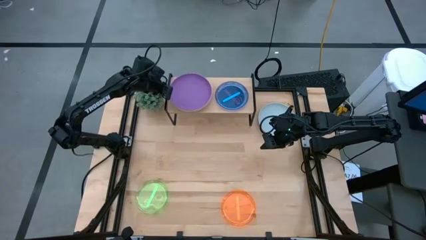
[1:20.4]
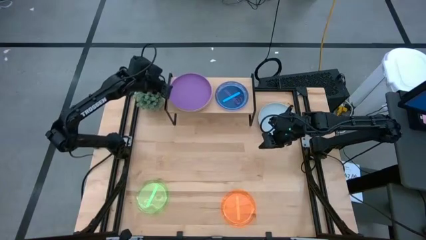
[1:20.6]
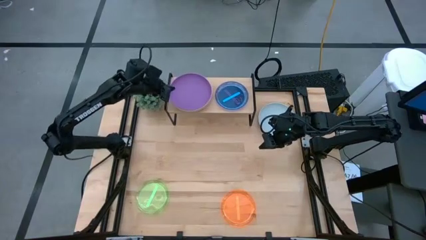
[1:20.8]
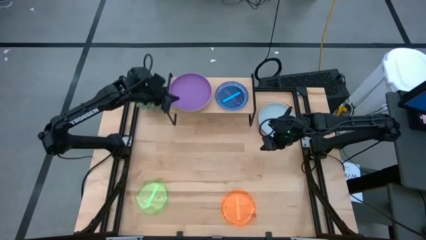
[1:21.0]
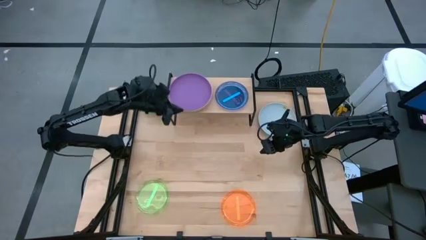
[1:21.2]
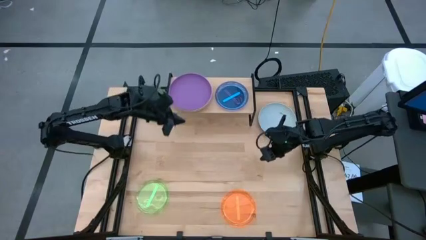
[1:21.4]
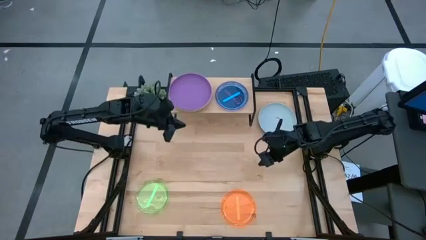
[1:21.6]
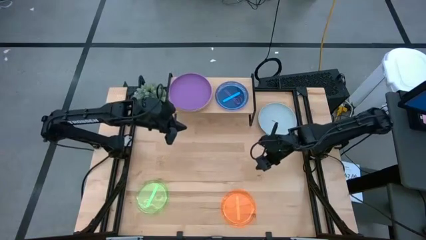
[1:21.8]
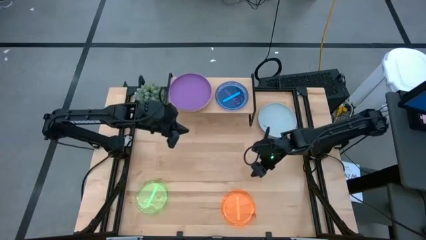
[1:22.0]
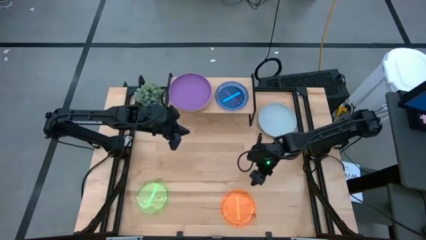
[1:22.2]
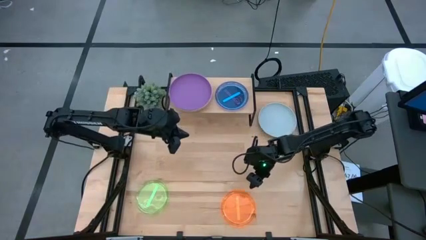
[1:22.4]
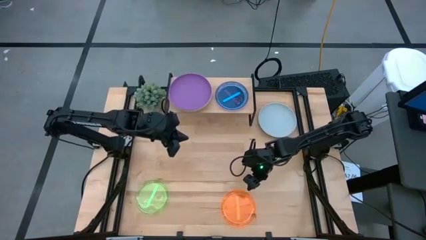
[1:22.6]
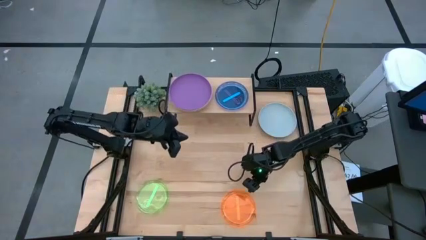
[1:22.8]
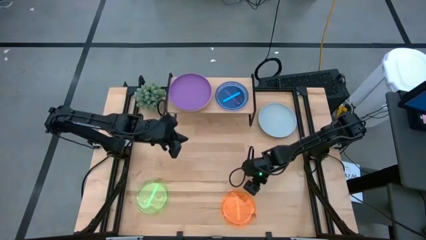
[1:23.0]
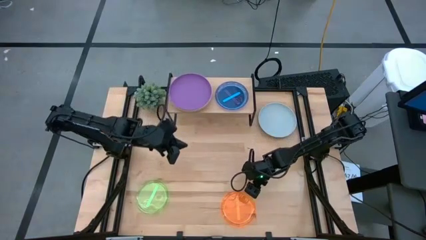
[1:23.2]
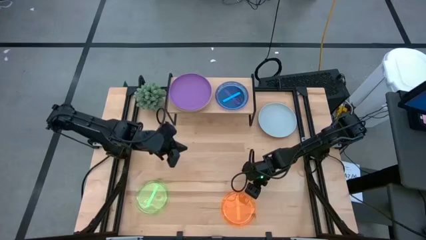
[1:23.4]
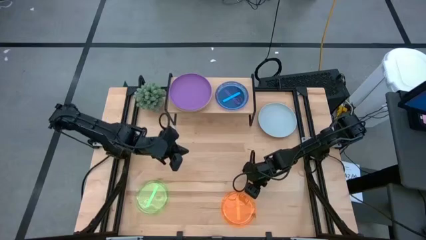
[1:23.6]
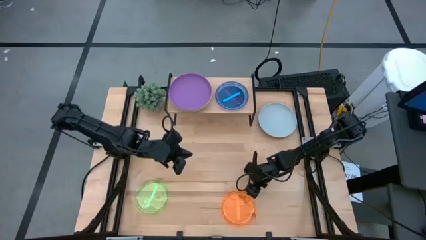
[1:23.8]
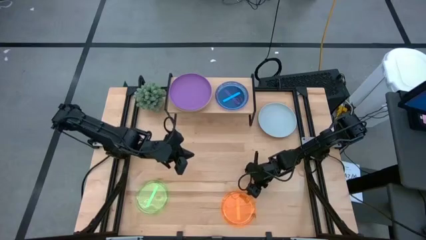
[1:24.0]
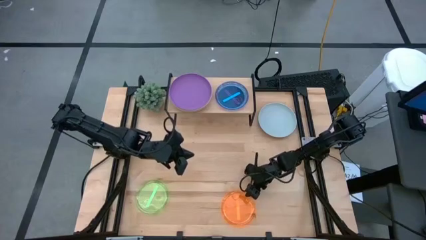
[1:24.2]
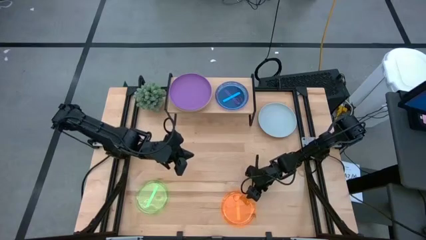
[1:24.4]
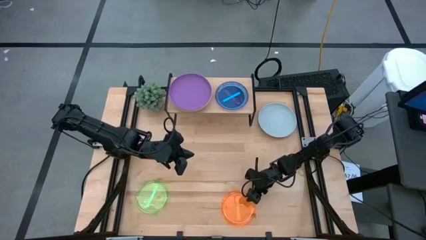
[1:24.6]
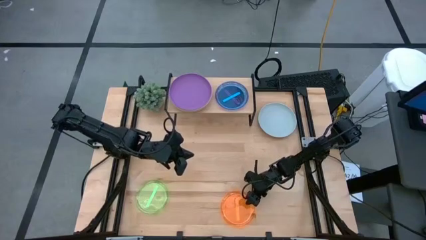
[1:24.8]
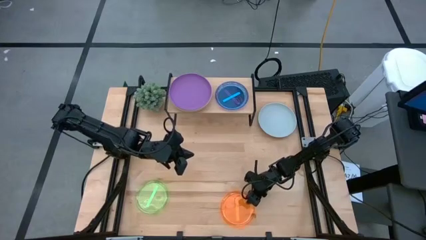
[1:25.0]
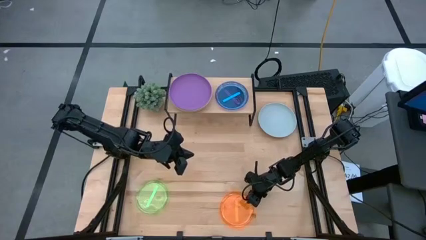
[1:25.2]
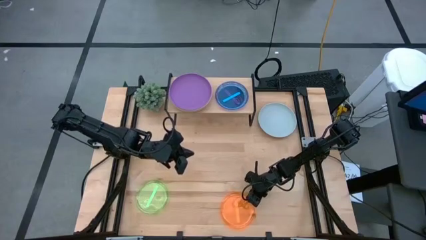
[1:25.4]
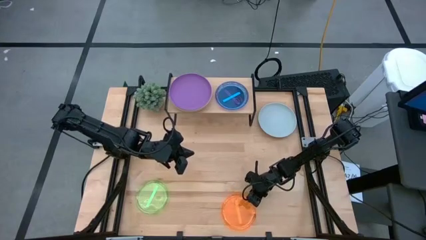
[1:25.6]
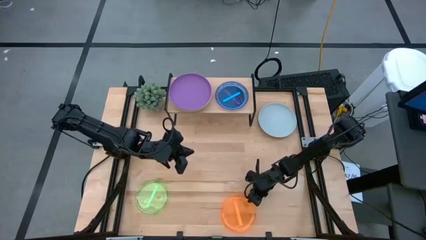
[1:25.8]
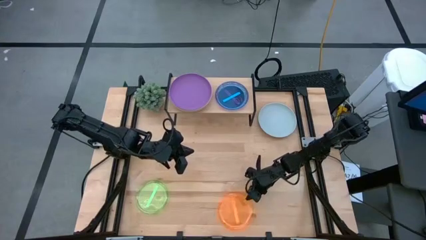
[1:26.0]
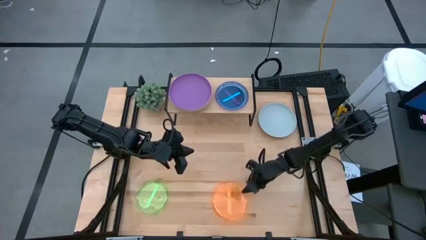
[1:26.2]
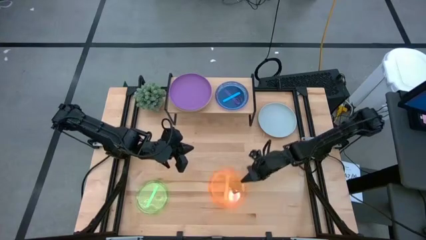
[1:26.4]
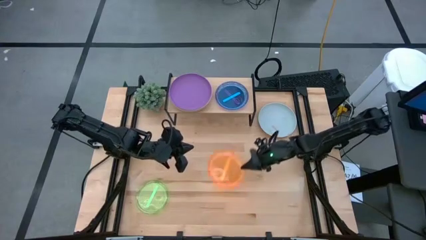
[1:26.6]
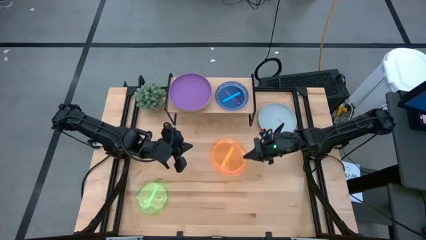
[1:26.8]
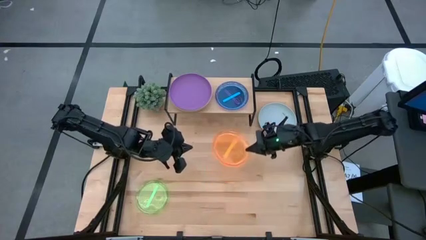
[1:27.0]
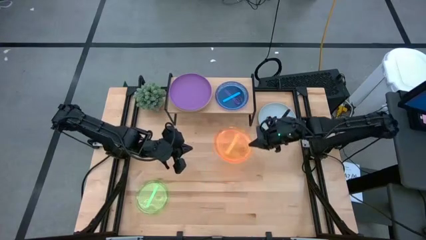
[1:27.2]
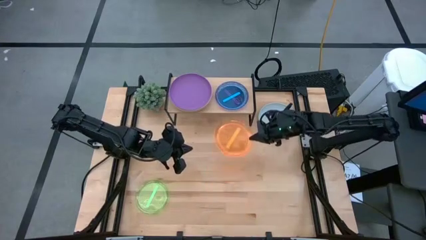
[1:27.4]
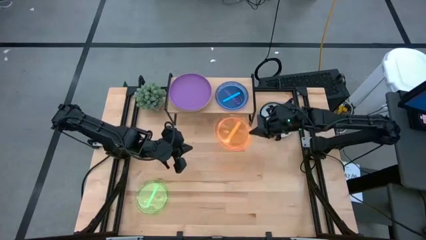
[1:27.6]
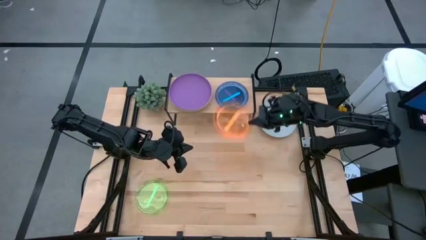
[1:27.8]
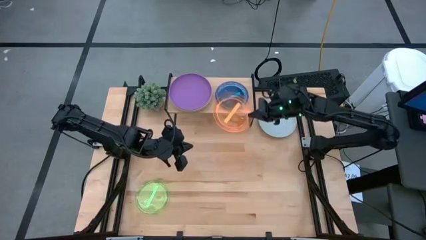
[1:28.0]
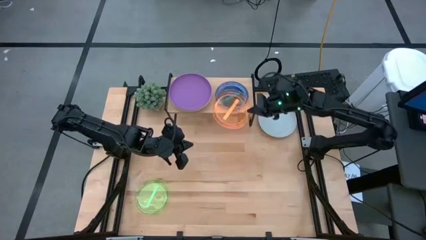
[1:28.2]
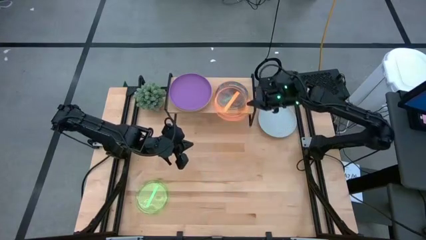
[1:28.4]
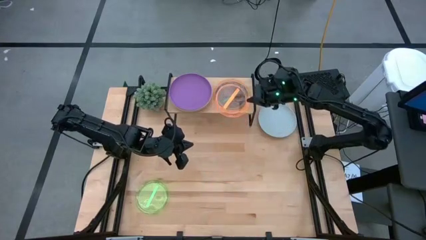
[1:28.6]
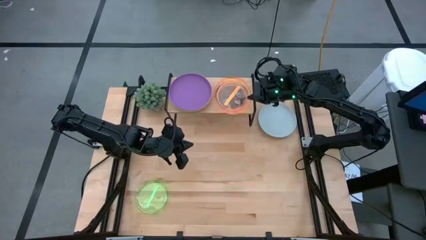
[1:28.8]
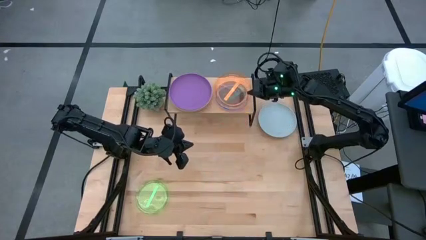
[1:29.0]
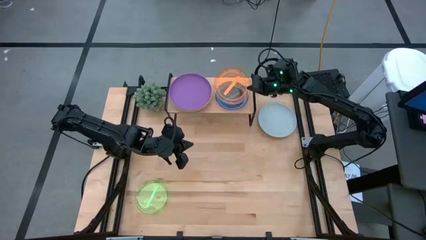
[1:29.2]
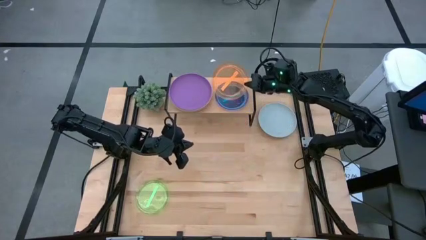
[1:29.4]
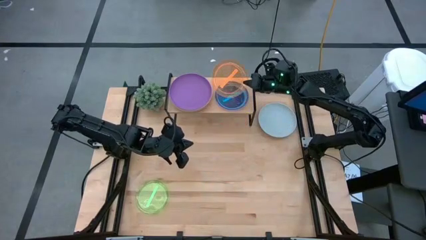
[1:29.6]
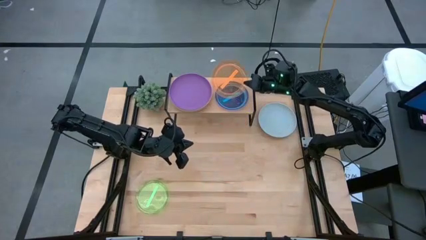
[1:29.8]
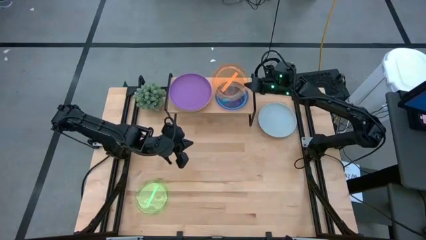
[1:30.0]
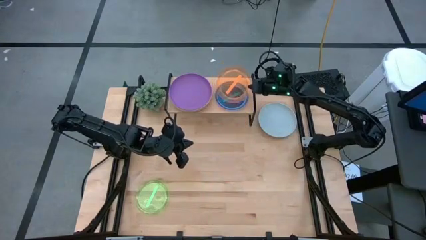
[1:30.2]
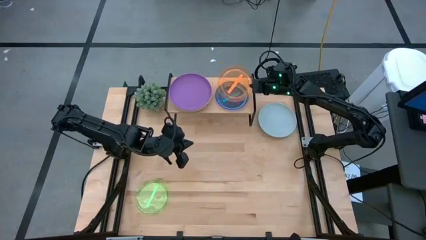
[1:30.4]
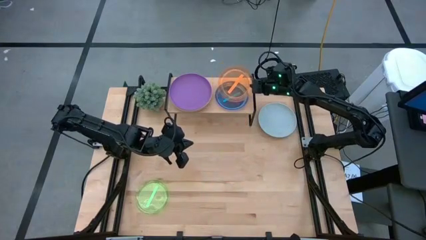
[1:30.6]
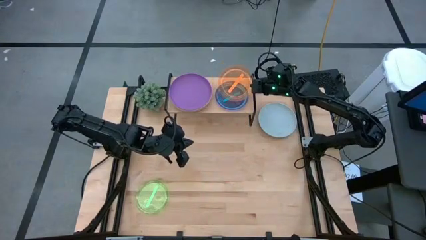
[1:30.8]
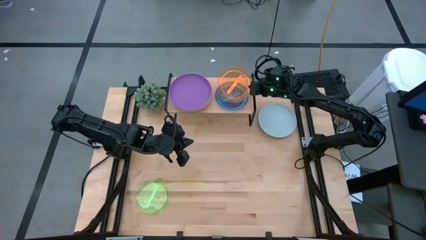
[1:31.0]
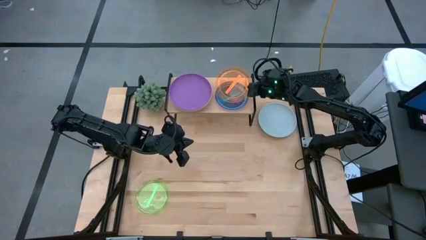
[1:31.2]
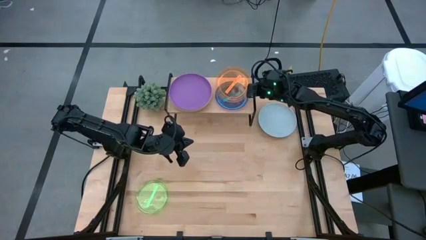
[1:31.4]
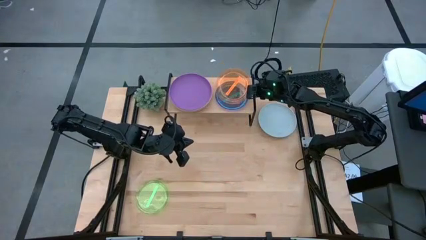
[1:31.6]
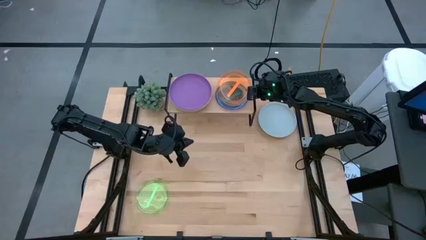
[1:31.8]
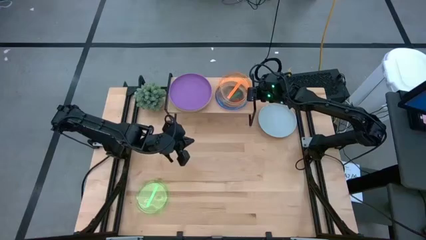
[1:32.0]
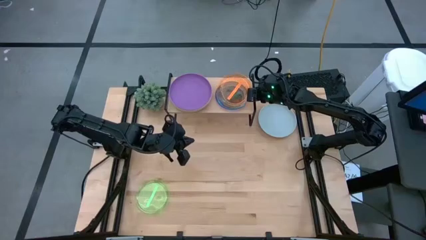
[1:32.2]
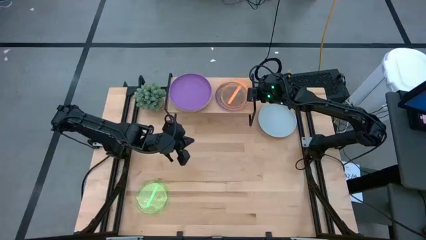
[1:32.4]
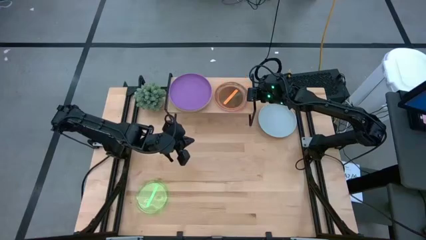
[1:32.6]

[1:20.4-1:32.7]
Task: Place and stack plates onto a shelf
Stack the orange transparent plate on top of the blue transparent plate on the shelf

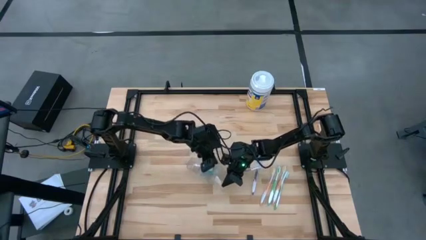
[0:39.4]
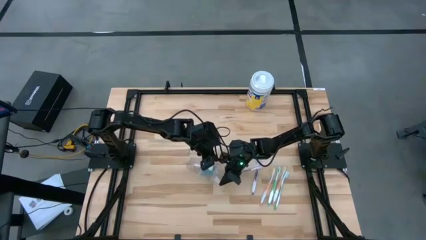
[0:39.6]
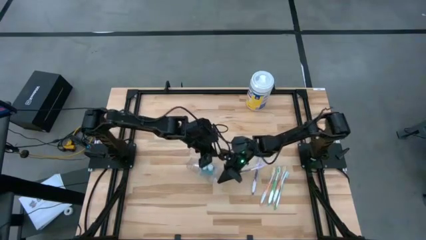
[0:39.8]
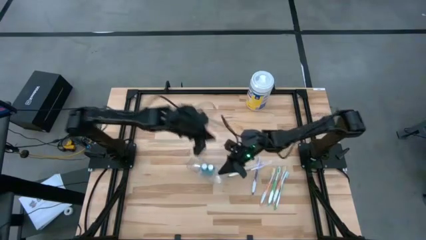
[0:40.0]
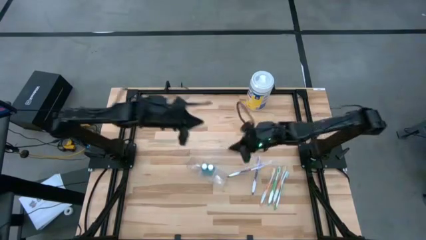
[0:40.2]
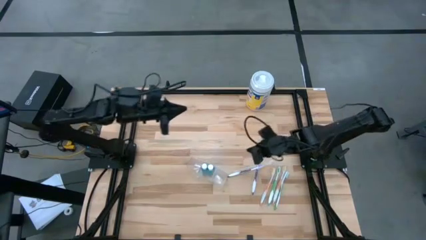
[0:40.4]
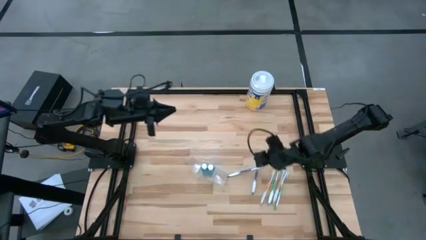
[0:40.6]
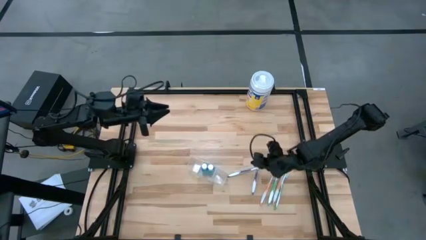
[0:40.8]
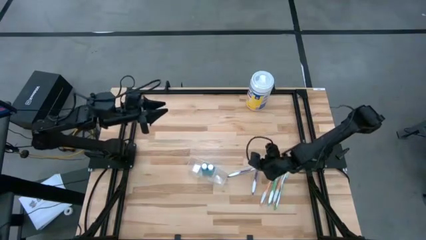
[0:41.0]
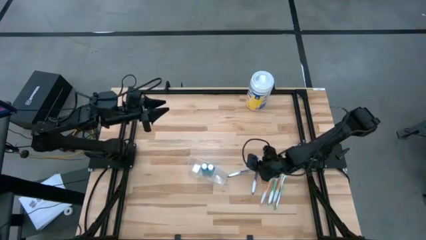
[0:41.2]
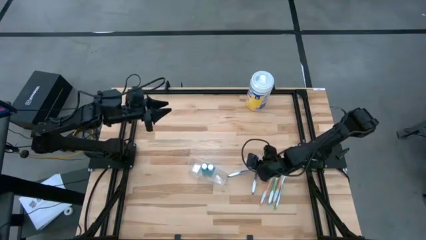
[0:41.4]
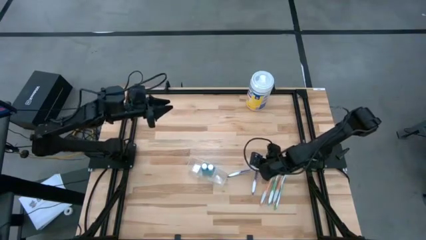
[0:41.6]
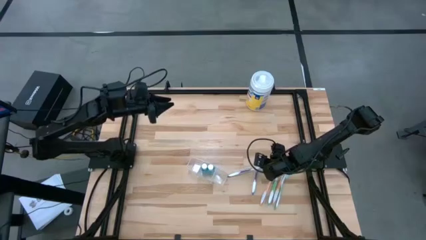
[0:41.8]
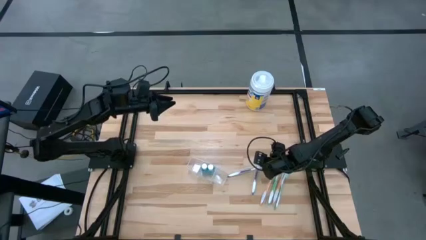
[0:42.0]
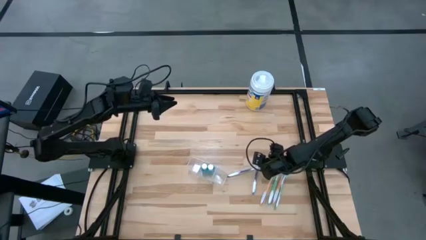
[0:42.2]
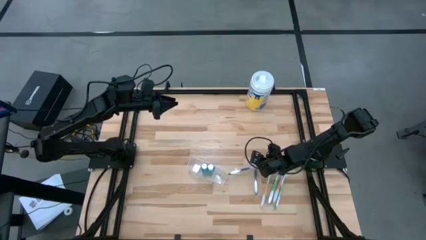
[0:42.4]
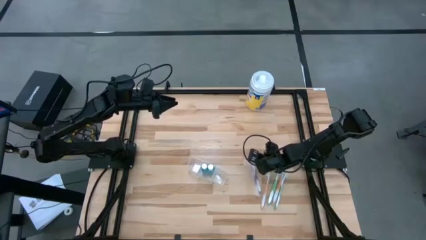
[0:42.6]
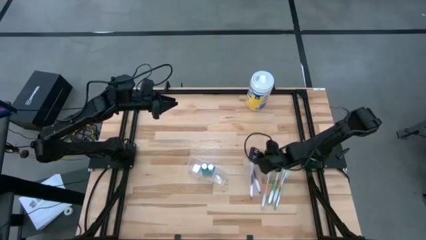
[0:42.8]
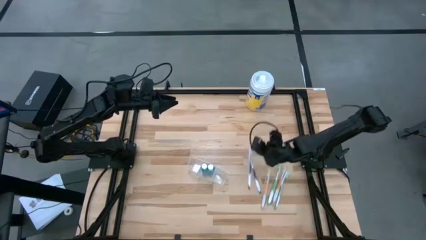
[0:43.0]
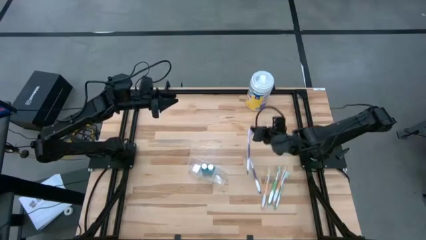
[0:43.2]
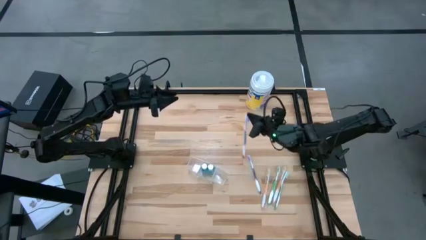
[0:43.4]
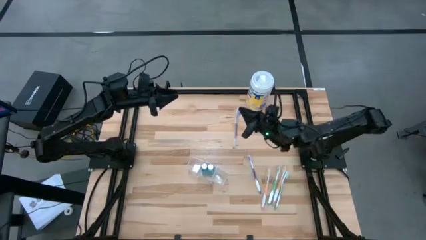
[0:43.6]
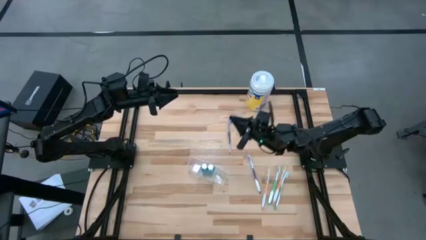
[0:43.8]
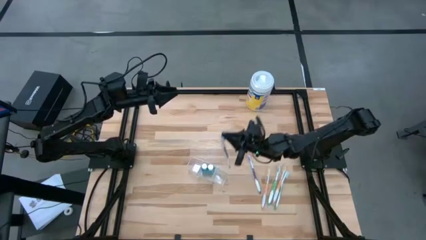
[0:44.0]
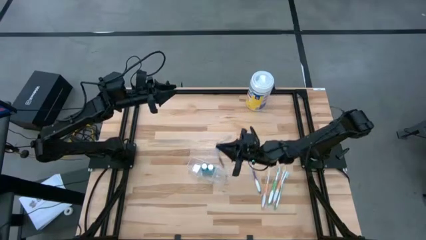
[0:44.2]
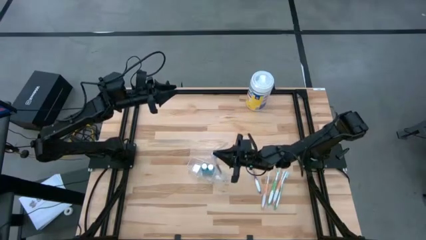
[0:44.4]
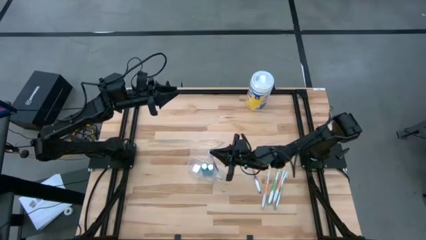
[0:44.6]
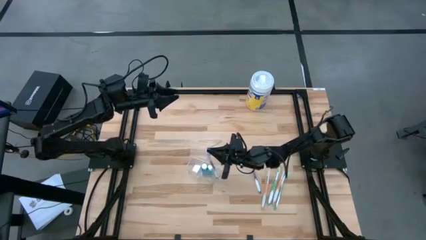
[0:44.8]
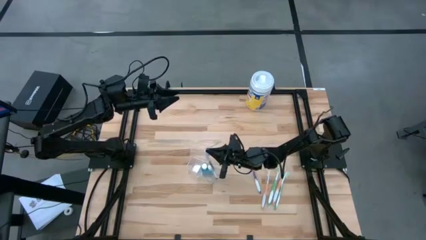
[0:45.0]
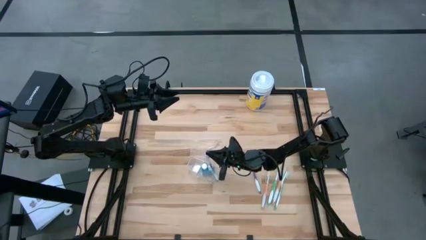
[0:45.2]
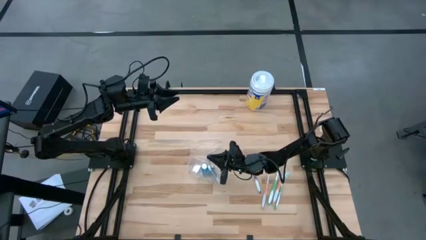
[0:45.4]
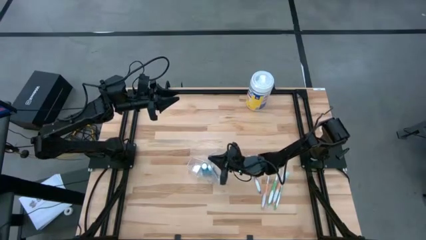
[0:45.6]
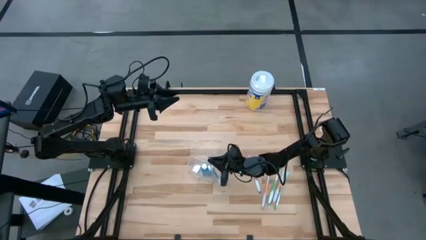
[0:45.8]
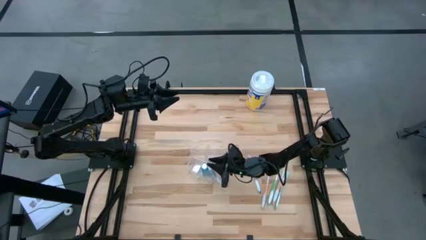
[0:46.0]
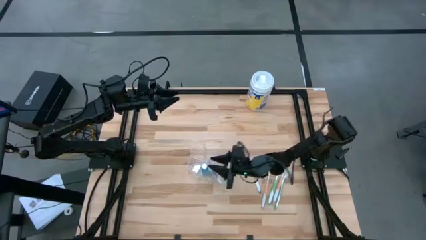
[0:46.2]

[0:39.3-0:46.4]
Task: Pick & Place toothbrushing station
Put the top purple toothbrush into the transparent organizer
